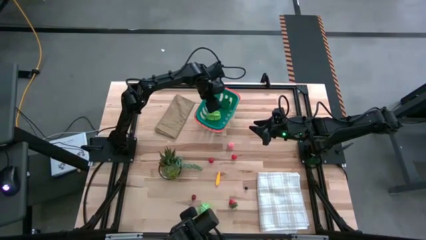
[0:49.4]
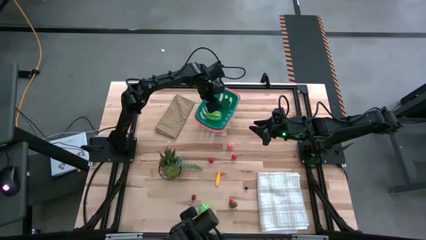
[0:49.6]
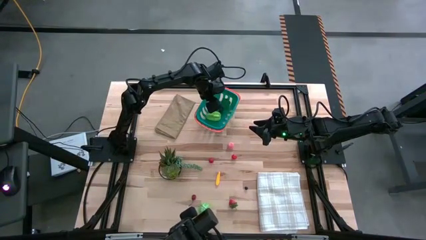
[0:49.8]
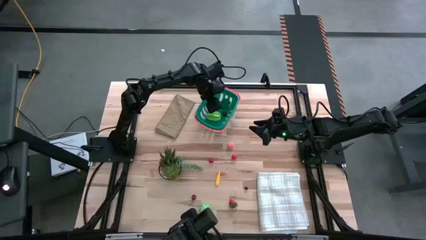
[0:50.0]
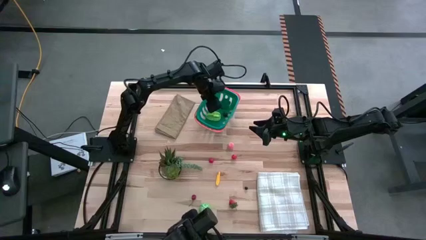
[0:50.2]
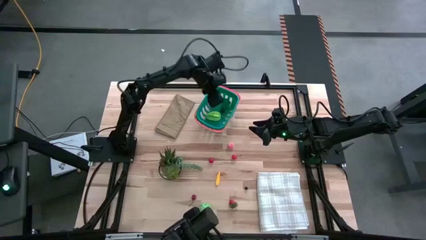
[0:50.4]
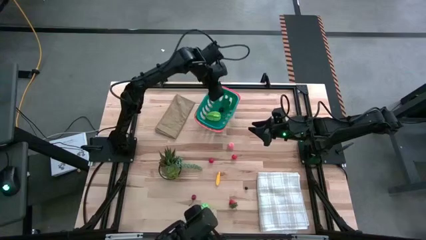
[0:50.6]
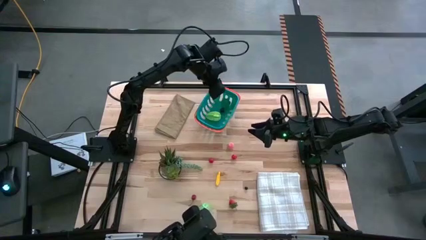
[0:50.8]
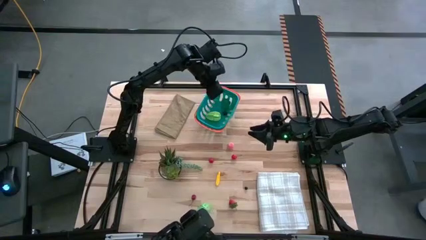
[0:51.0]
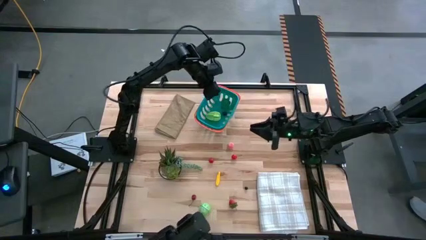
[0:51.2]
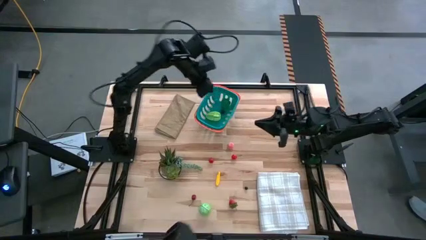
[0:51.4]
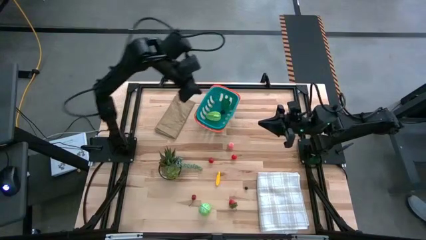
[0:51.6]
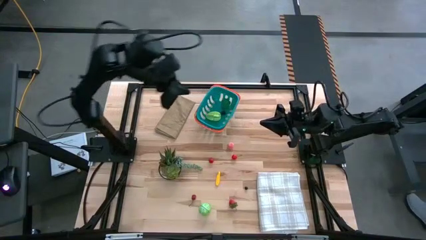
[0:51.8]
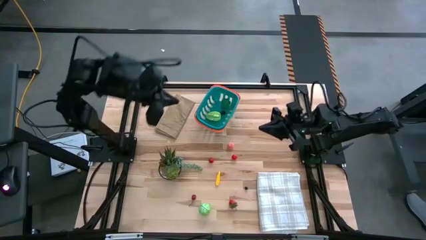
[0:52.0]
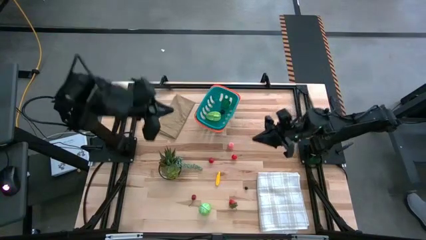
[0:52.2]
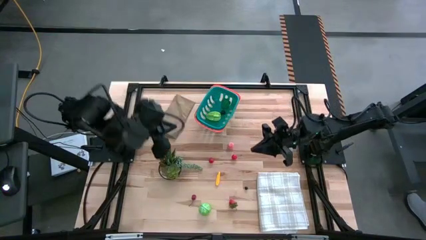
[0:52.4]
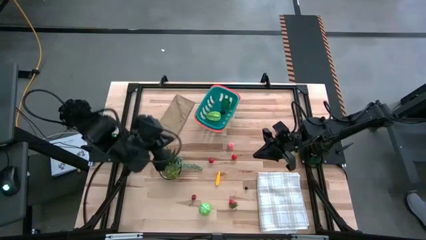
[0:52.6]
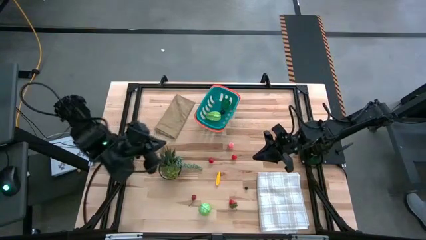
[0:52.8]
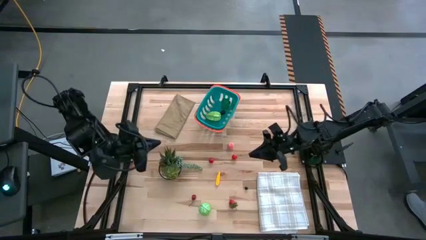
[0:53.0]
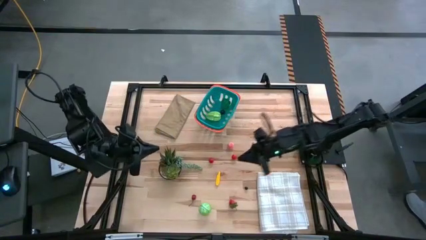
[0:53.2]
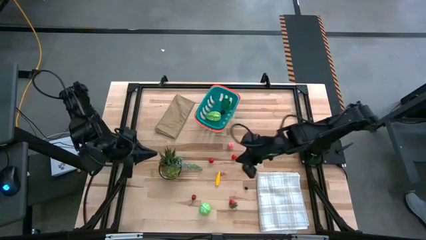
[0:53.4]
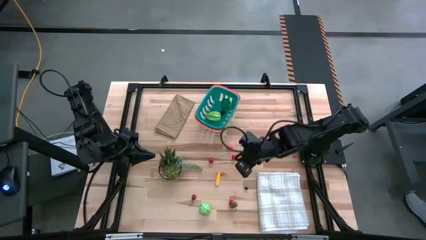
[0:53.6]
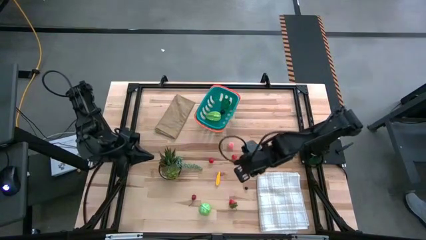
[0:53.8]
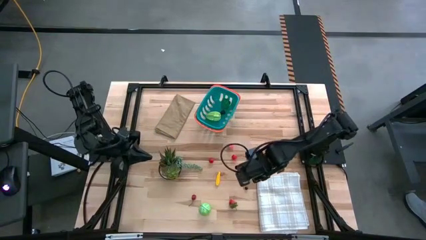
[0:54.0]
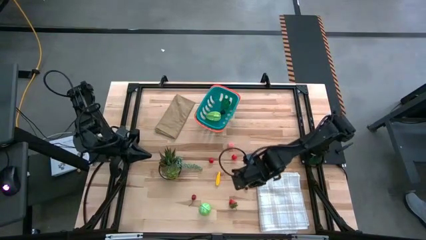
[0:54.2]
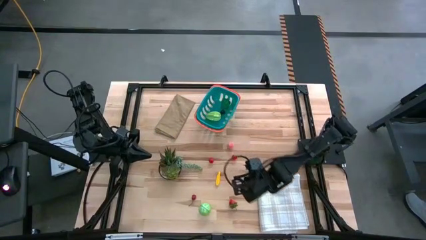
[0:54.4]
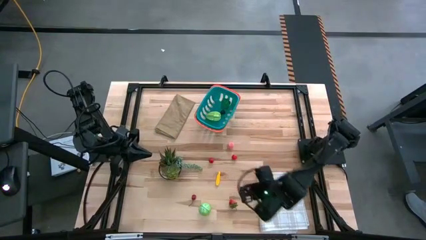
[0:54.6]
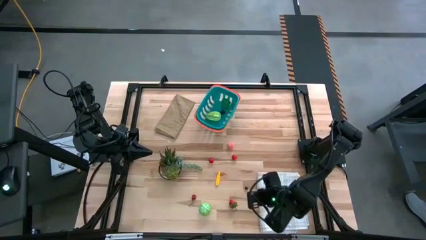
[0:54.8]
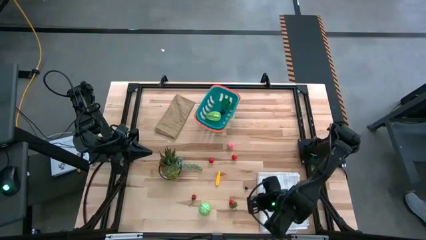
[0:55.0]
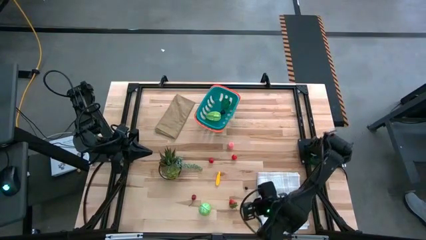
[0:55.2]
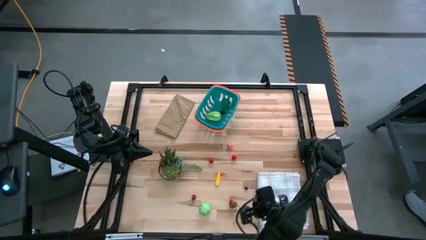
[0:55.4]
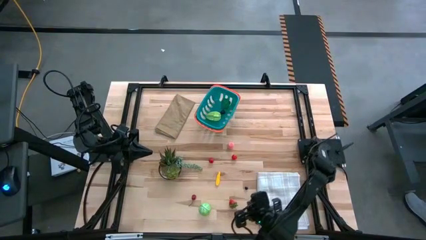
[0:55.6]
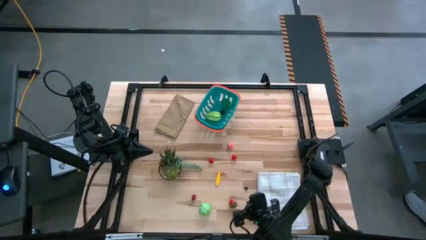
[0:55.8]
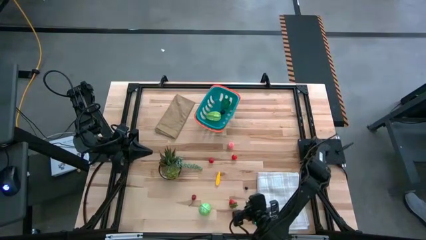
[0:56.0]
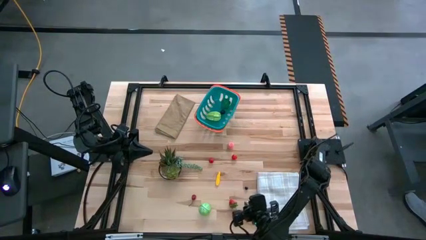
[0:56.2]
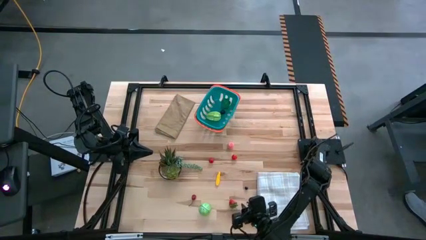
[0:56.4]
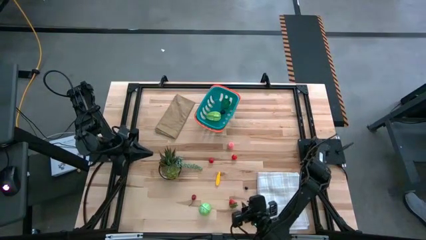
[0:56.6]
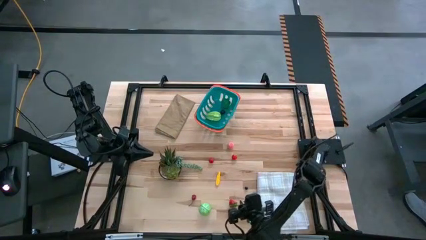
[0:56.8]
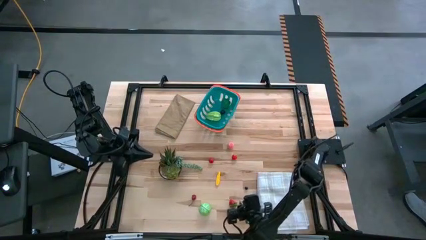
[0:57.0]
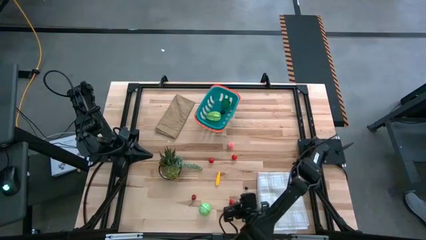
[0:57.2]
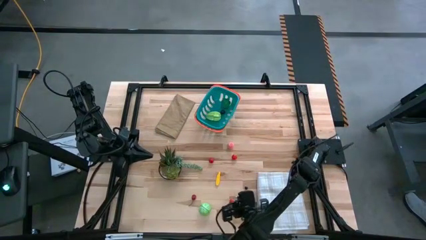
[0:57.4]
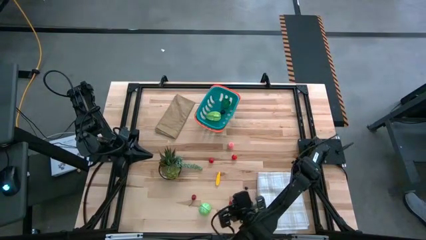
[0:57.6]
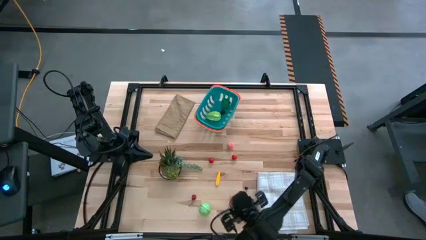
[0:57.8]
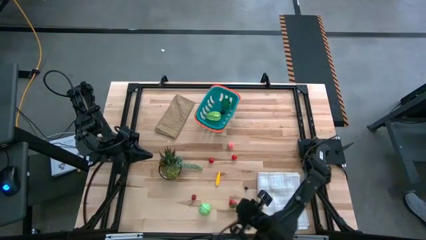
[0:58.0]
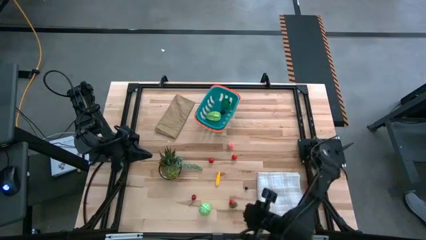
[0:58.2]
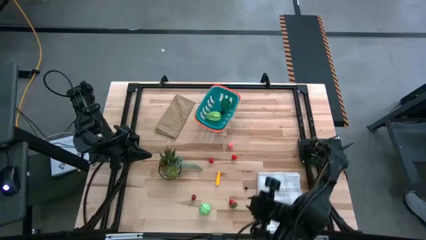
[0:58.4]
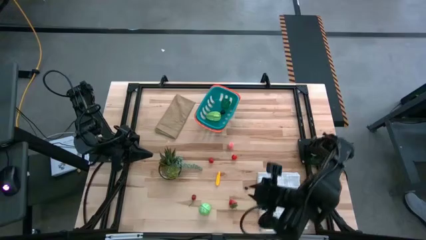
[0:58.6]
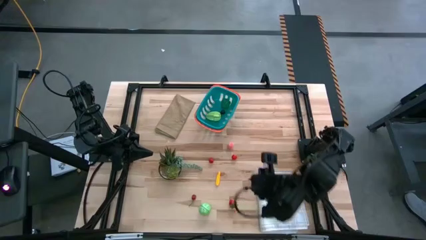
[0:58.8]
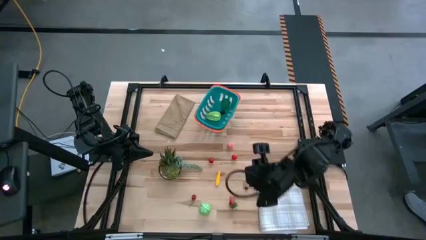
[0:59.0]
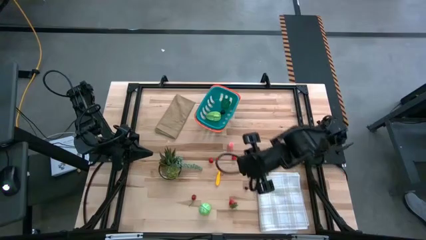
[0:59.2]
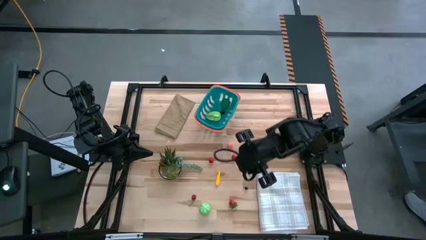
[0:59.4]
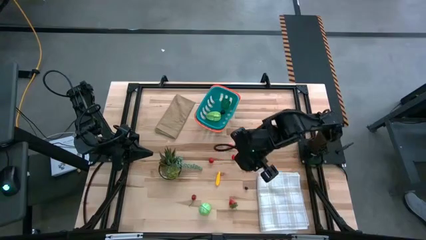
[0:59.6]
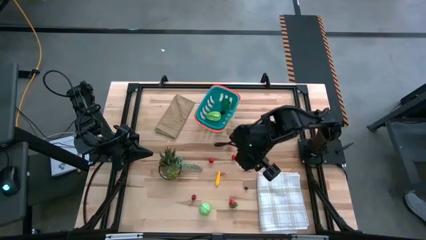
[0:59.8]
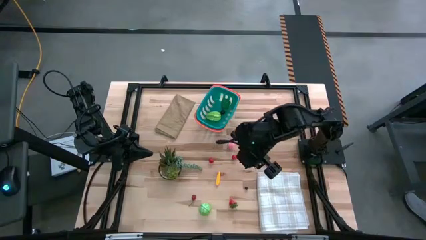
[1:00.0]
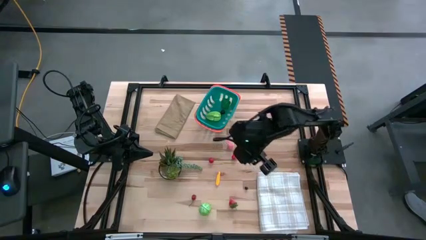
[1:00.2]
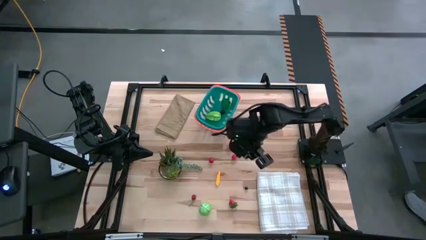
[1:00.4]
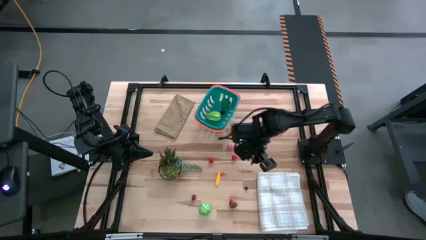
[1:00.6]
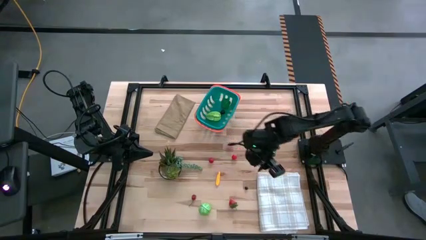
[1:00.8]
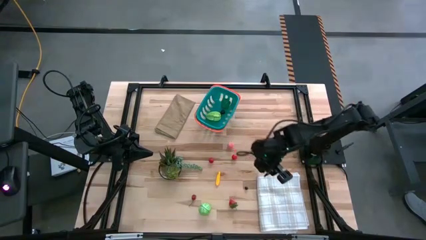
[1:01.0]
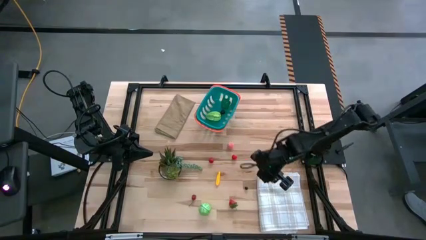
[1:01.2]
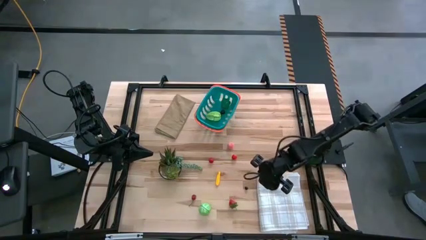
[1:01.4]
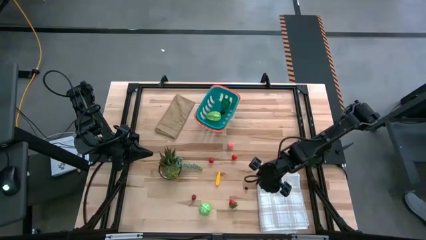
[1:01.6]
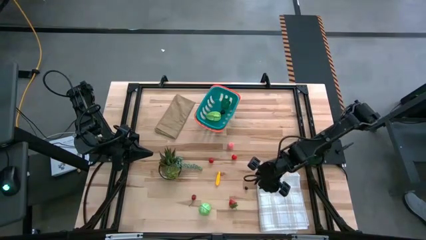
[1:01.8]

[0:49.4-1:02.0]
Task: Pick and placing Produce into tupperware
Put the black cherry in the green basket
